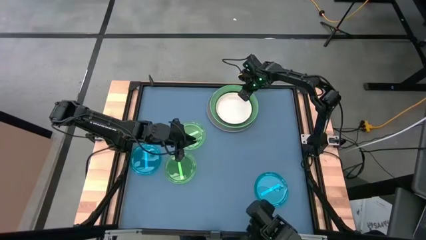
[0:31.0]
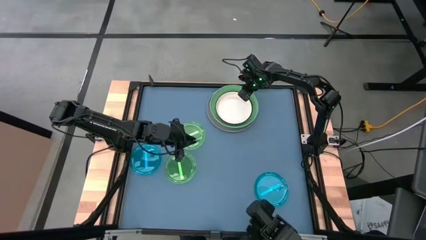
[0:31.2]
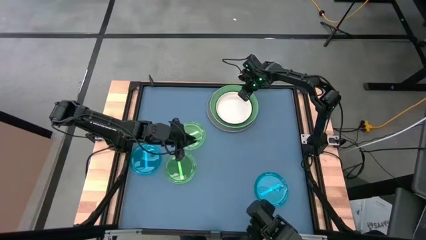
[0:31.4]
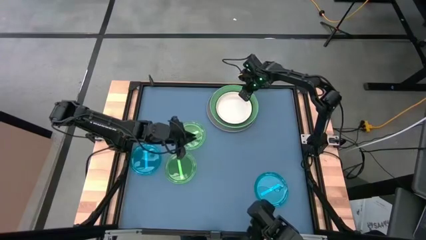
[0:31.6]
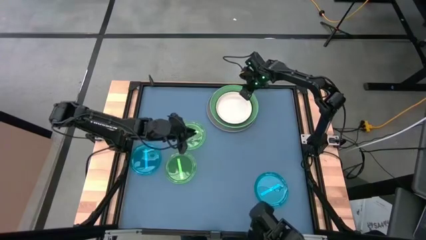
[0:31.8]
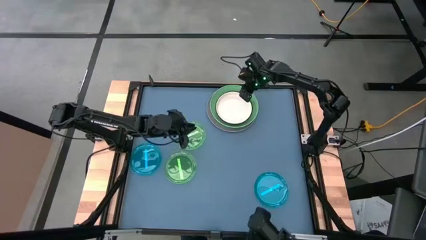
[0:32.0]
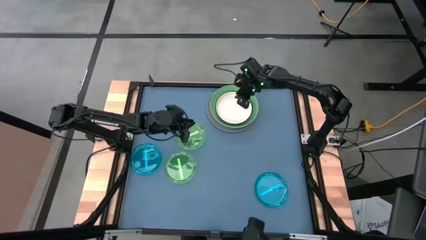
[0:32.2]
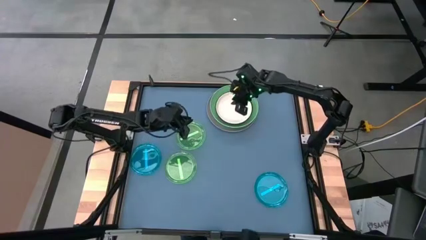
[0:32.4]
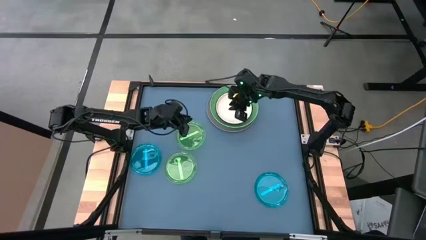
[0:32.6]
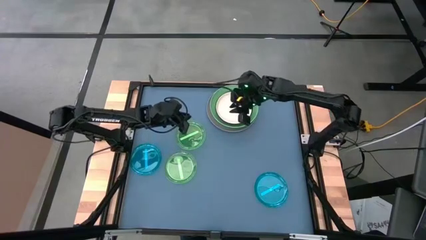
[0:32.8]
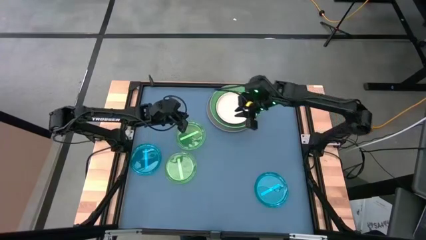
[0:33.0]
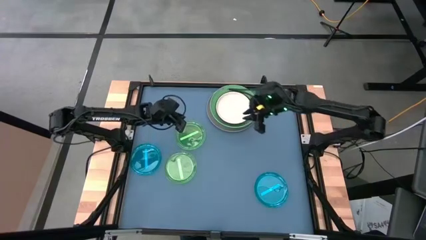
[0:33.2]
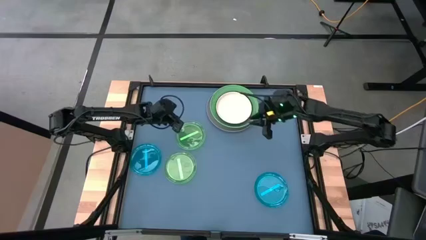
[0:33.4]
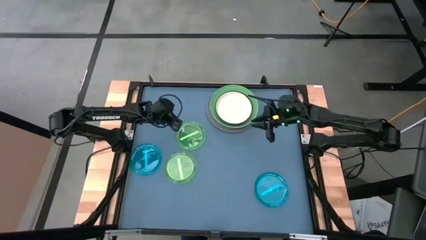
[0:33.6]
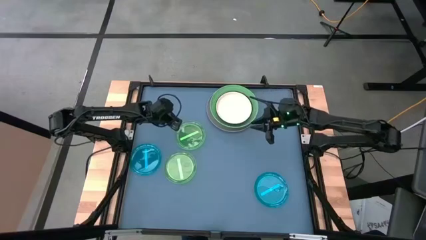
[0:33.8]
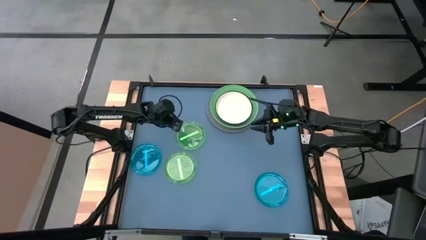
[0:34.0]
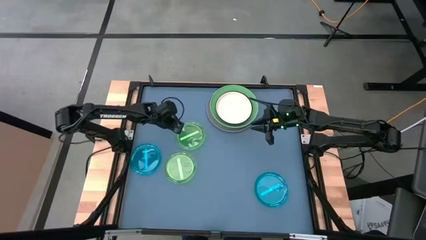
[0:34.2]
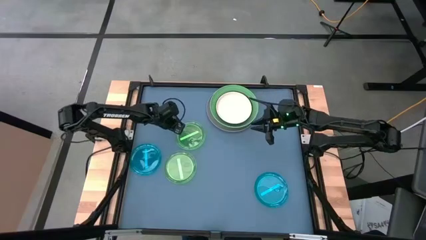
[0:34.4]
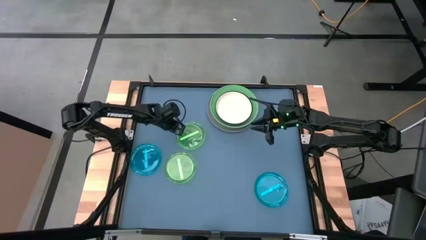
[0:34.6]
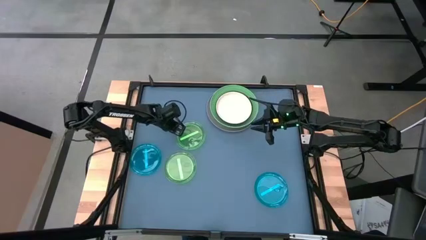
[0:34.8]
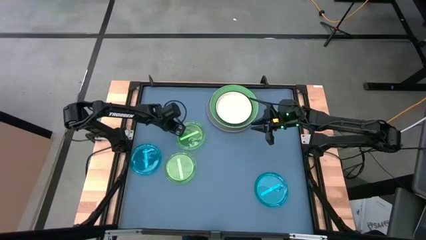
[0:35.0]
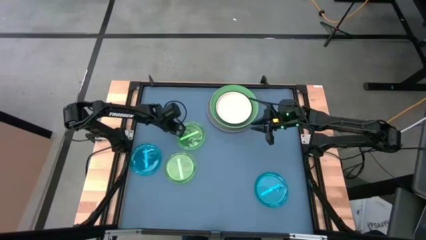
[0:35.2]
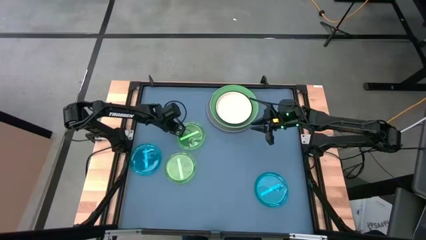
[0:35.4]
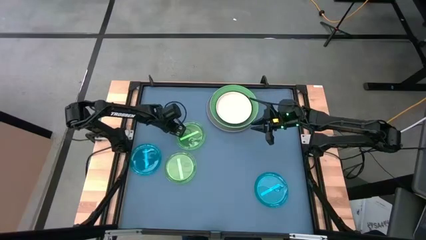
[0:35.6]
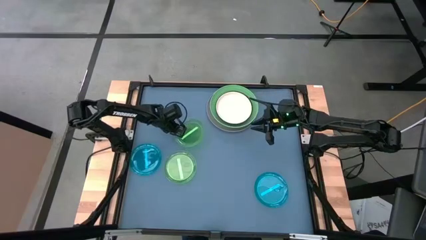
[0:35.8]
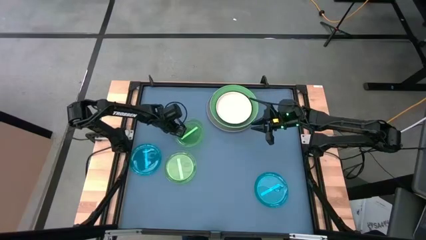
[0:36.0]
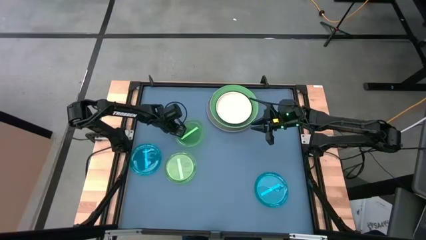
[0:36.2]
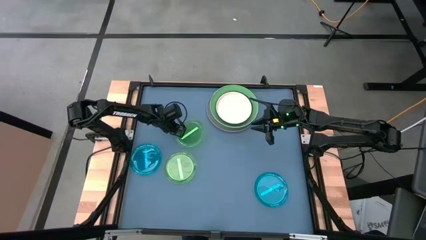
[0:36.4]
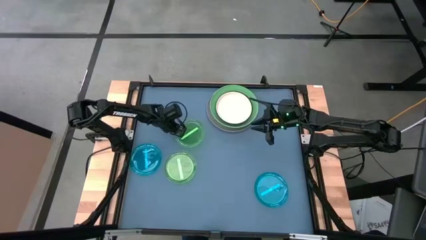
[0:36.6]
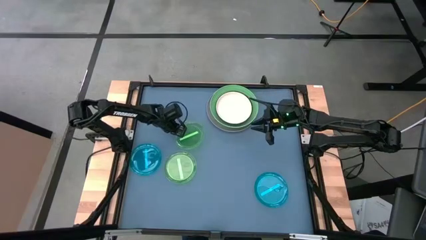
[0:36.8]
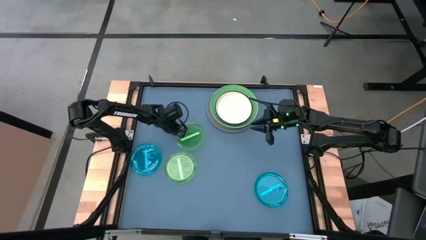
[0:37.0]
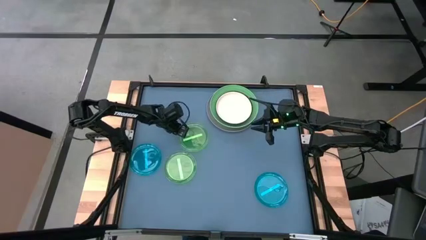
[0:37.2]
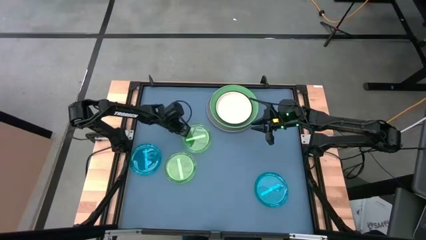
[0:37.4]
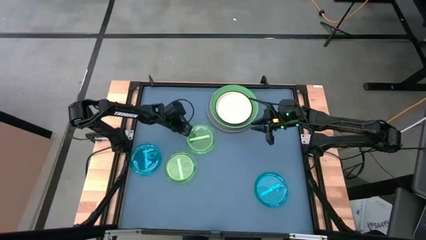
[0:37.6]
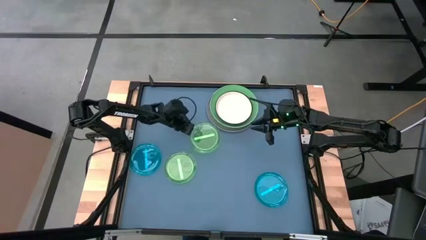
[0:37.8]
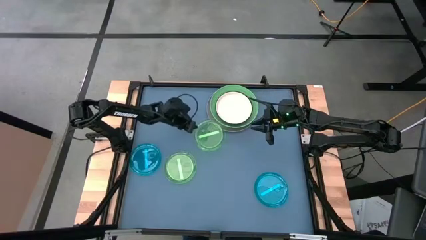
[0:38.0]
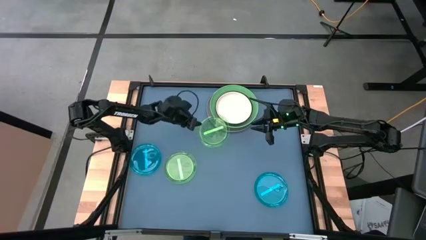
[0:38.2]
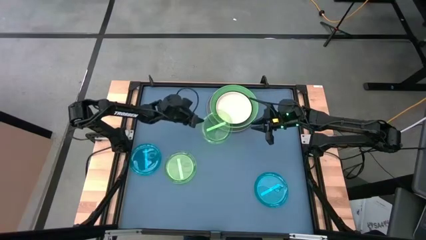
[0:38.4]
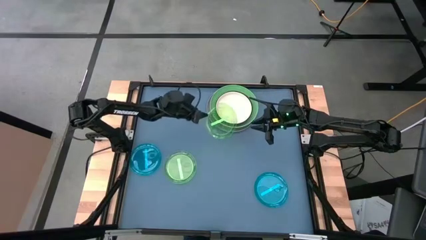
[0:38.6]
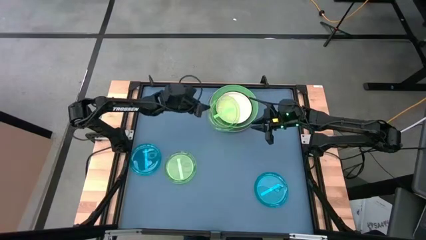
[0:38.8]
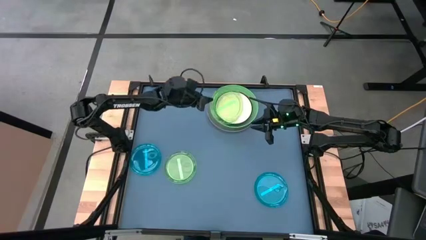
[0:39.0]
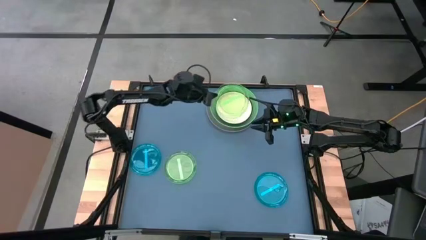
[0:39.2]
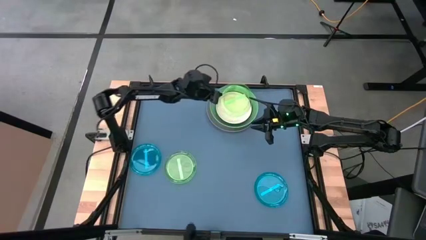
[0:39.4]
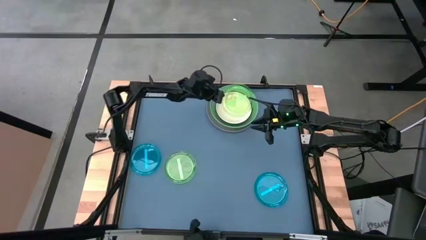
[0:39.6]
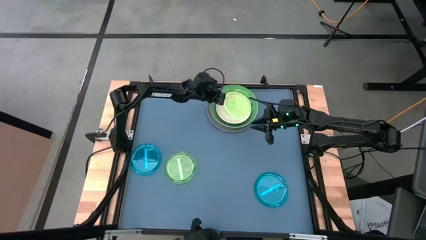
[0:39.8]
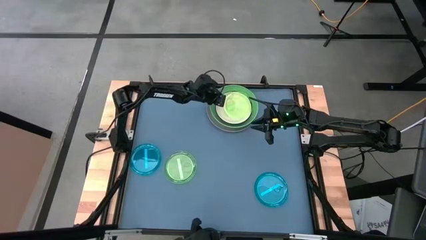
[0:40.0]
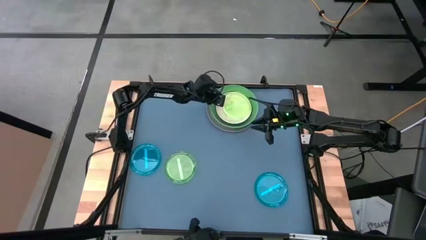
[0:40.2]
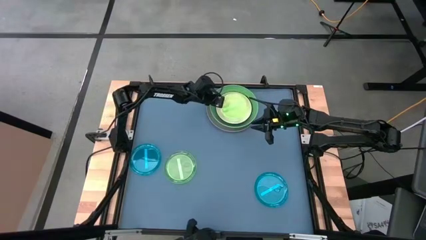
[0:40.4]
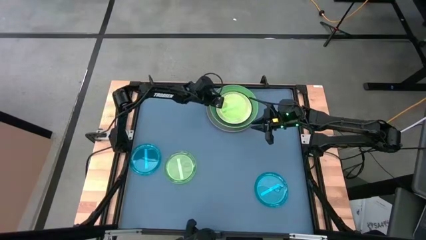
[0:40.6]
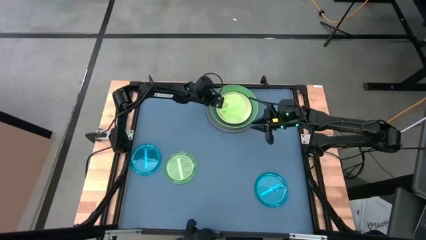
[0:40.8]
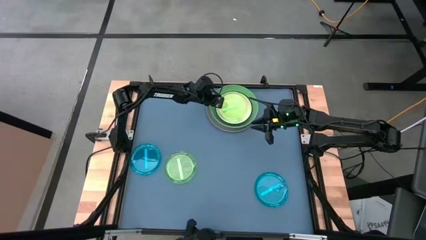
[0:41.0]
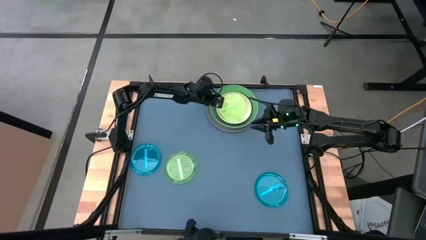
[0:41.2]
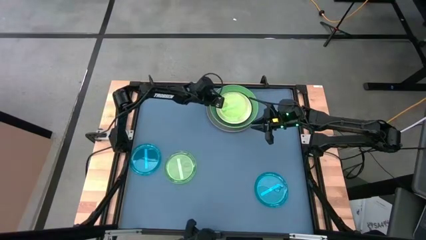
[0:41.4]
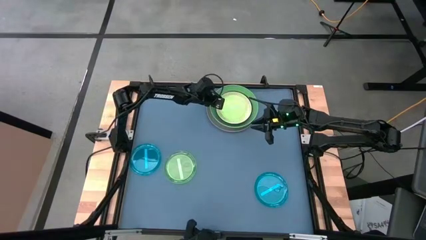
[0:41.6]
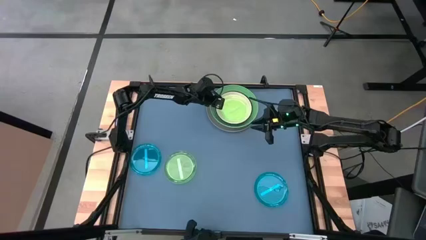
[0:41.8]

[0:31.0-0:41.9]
Task: Stack plastic plates
Stack the small green plate on the medium white plate

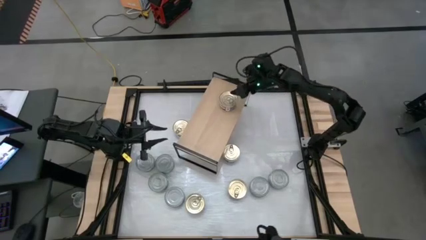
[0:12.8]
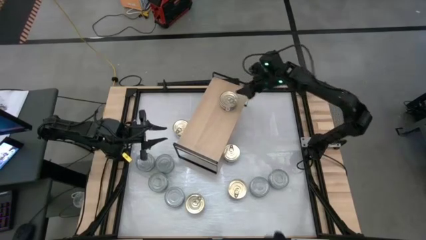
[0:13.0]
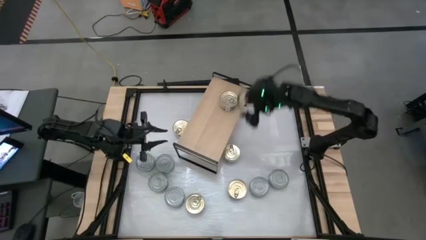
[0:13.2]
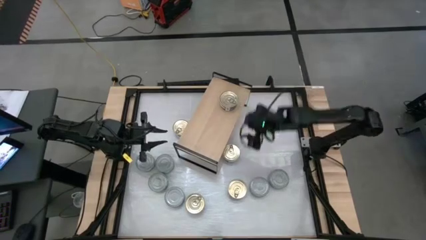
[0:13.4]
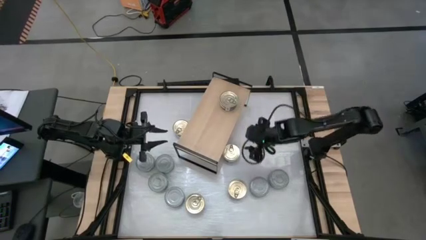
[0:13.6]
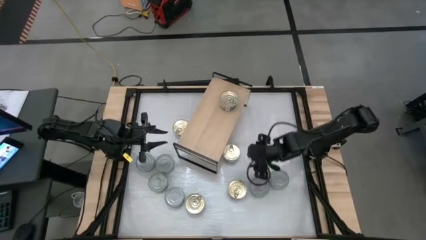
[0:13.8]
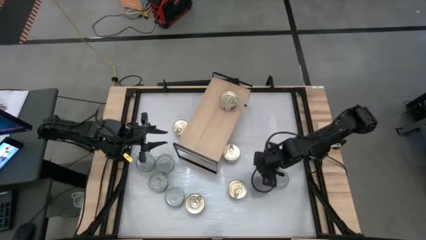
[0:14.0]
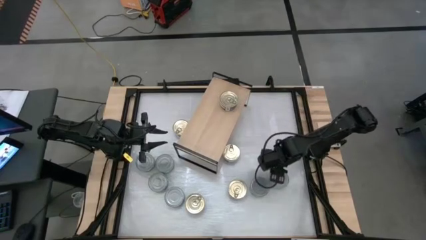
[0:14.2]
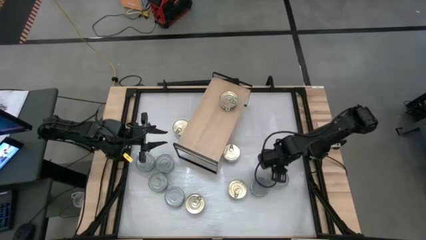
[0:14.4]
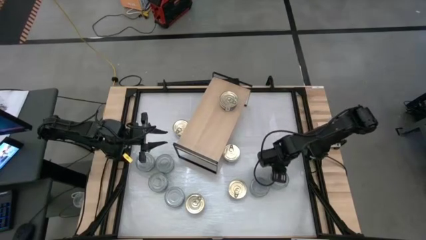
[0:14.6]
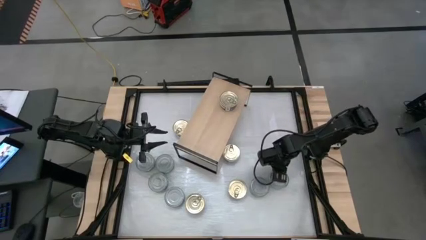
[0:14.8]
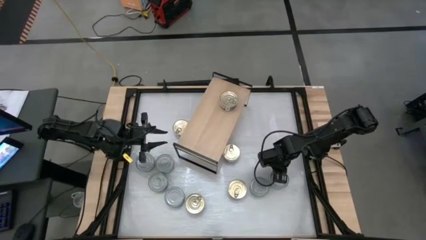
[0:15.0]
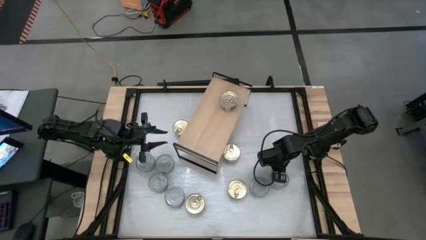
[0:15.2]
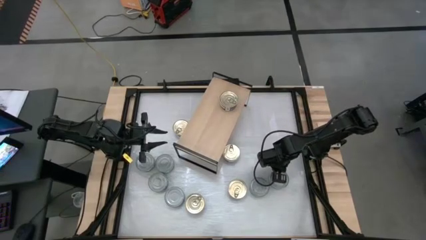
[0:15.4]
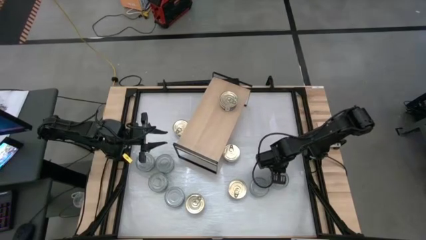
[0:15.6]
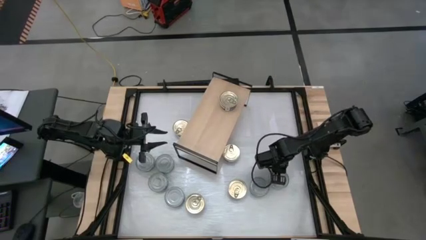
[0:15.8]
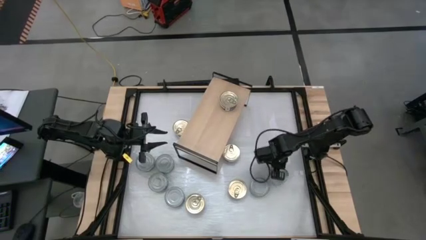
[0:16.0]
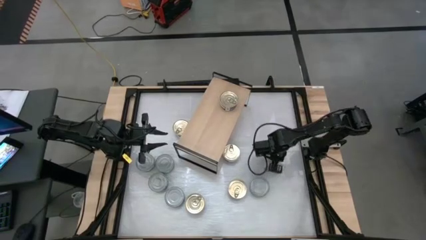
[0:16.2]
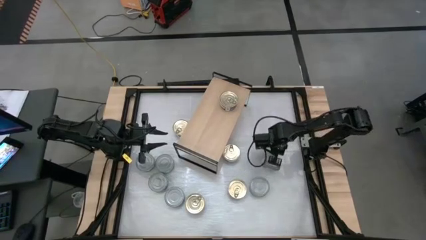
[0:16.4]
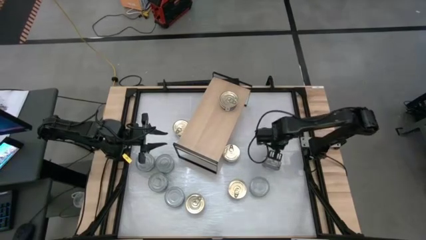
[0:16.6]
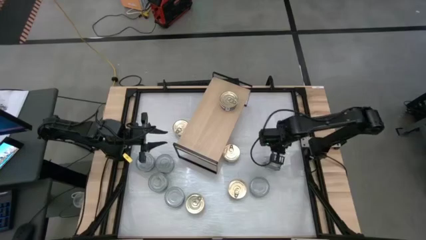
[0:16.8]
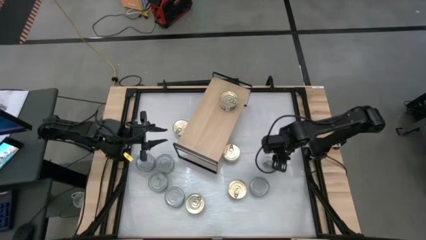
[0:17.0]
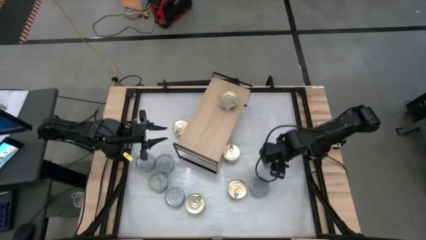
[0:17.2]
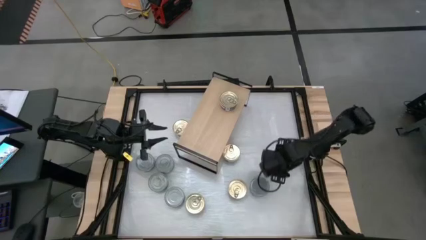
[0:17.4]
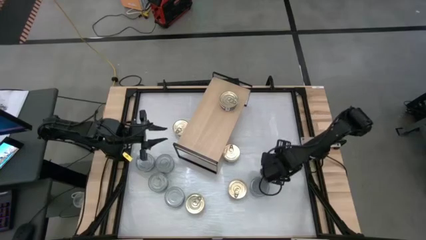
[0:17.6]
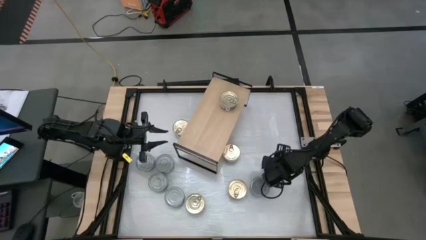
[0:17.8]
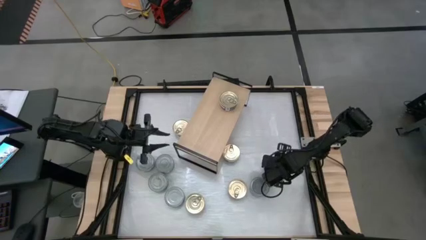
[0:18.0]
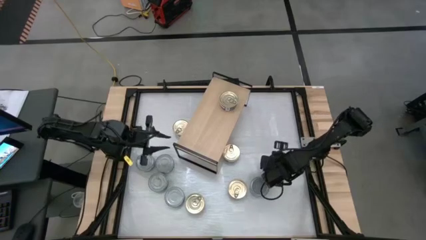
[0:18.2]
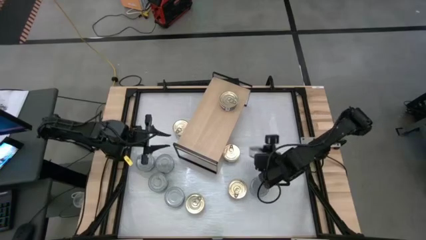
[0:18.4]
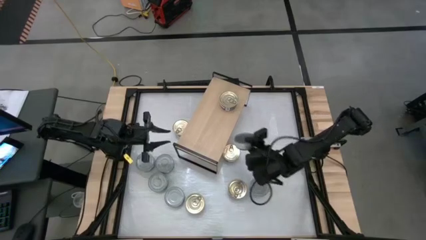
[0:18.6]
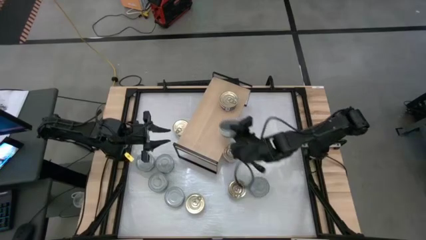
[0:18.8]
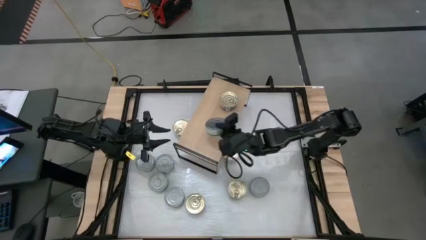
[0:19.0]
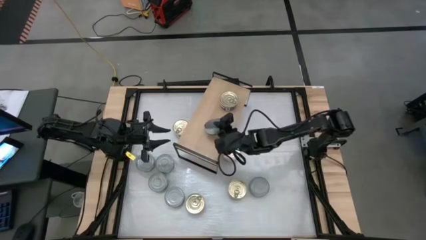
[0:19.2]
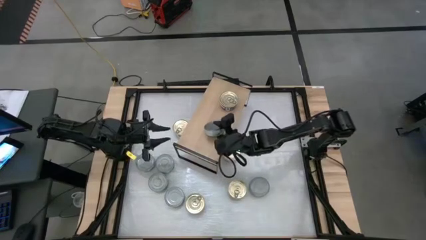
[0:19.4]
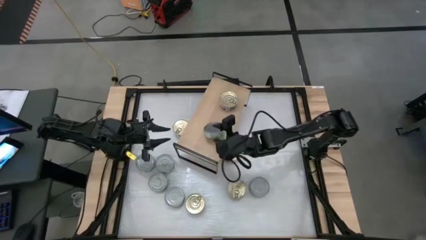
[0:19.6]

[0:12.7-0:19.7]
Task: Stack canned seafood by type on shelf
Put the green tuna can on the shelf
